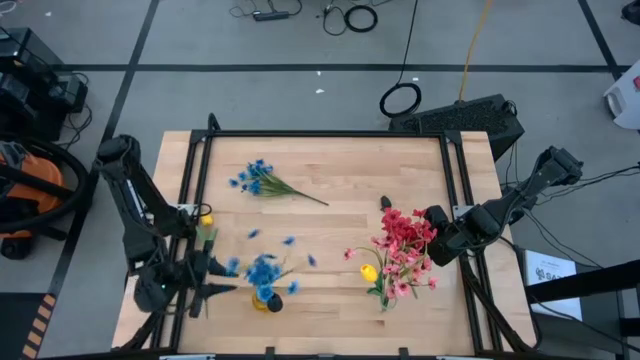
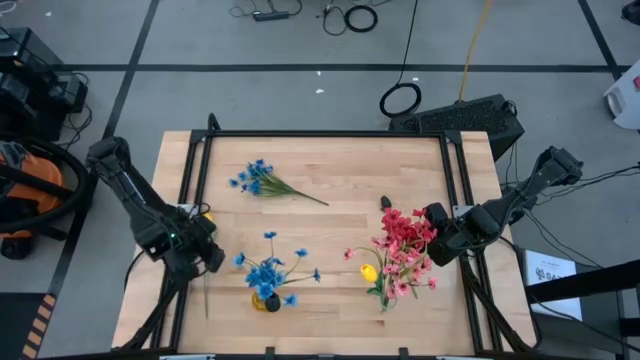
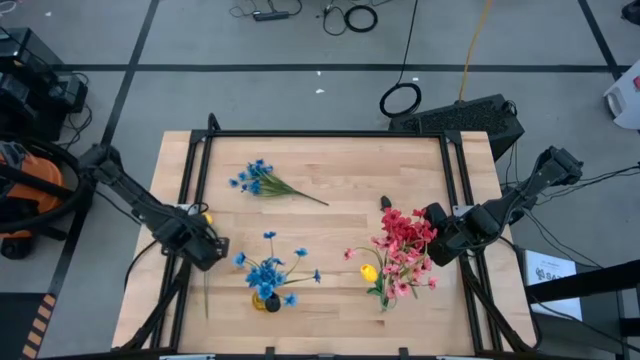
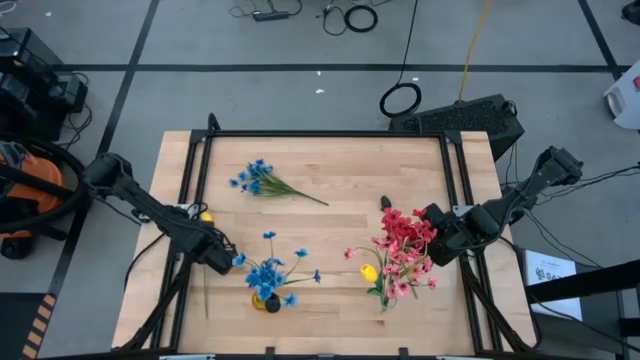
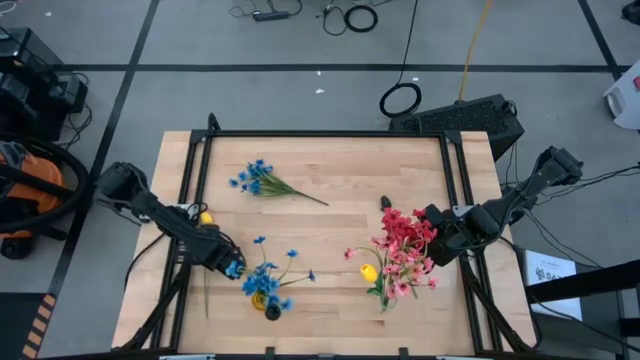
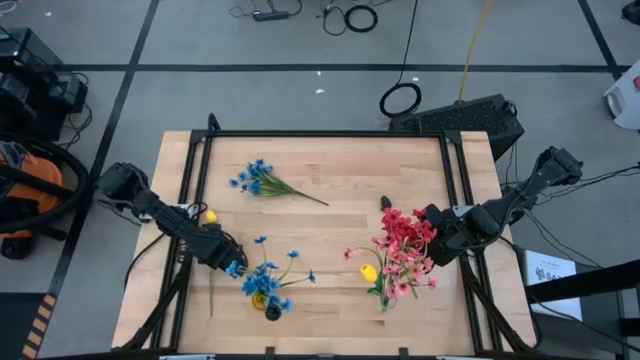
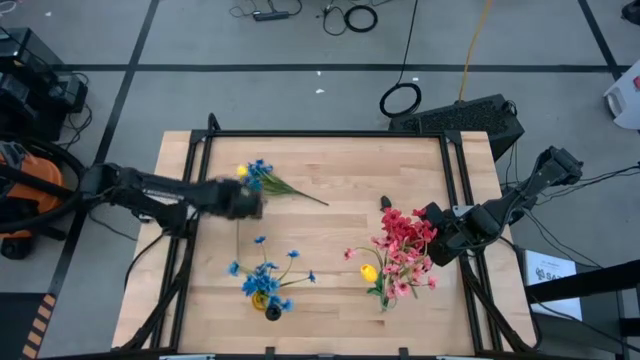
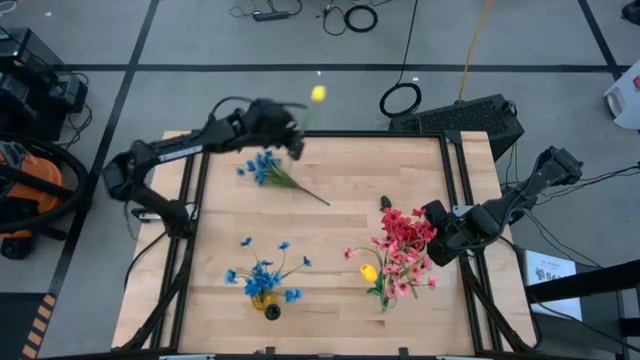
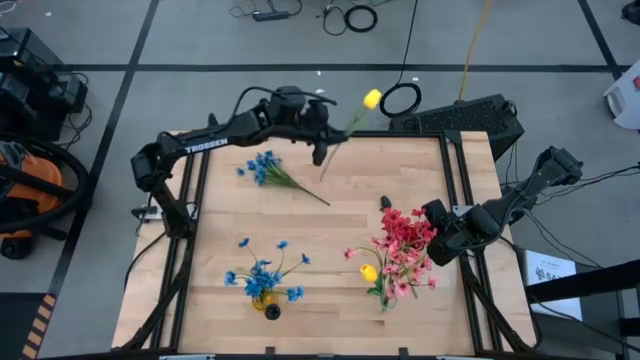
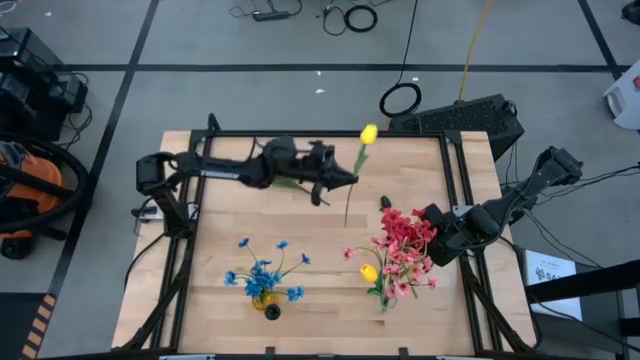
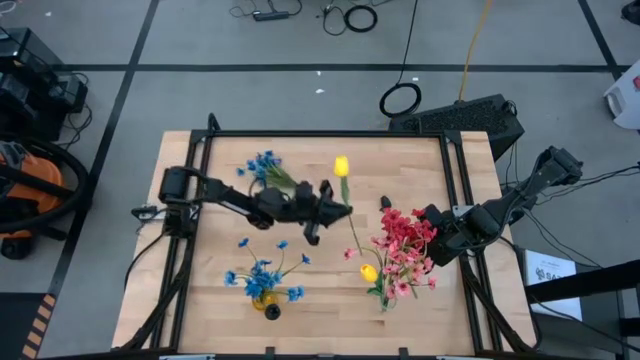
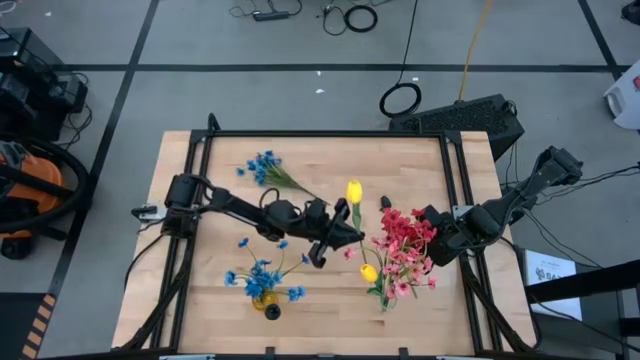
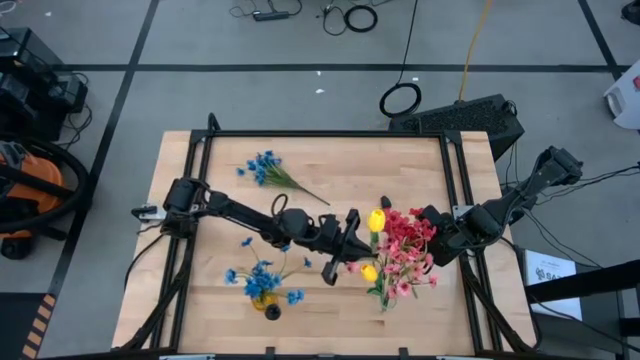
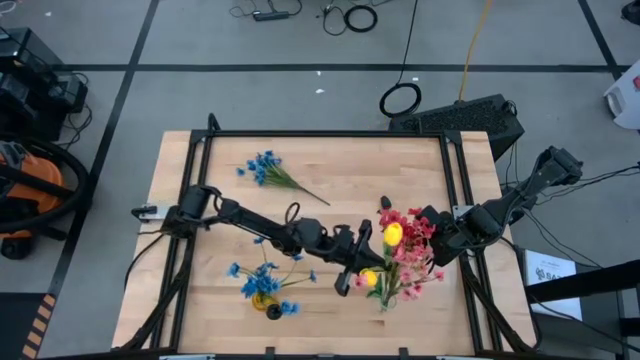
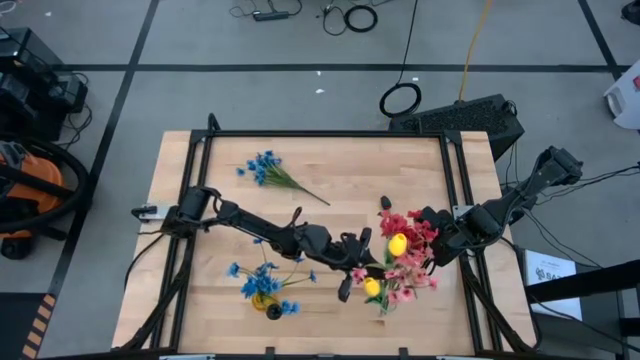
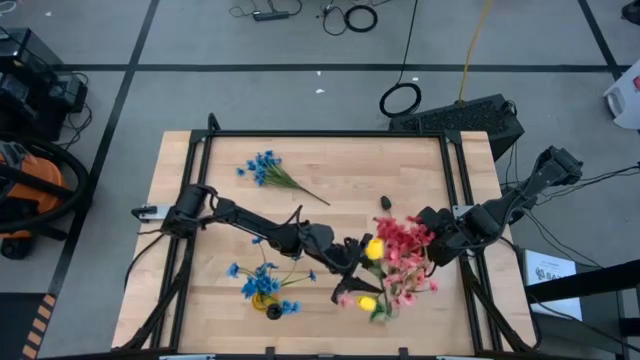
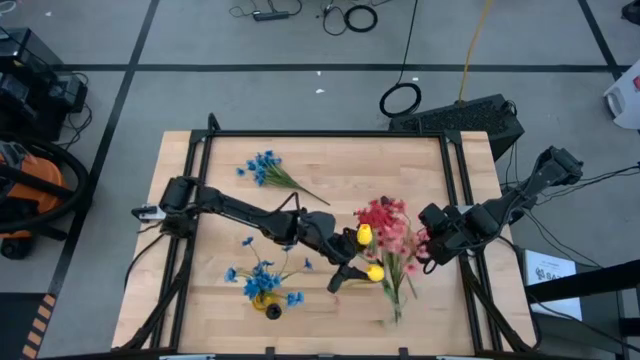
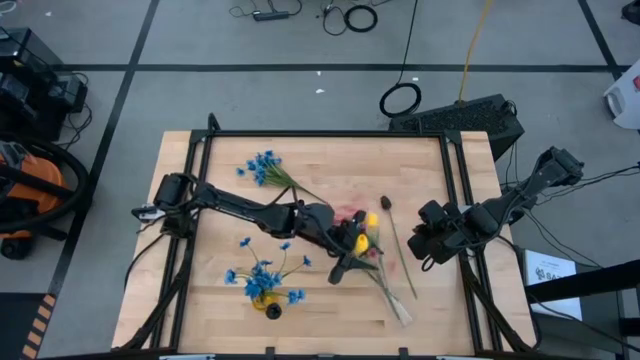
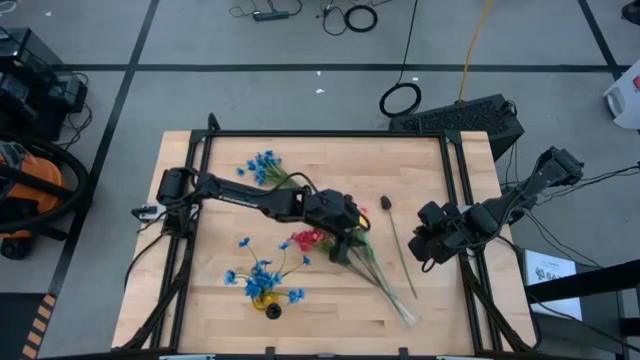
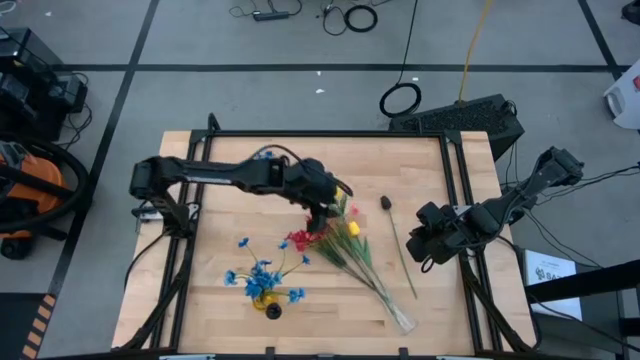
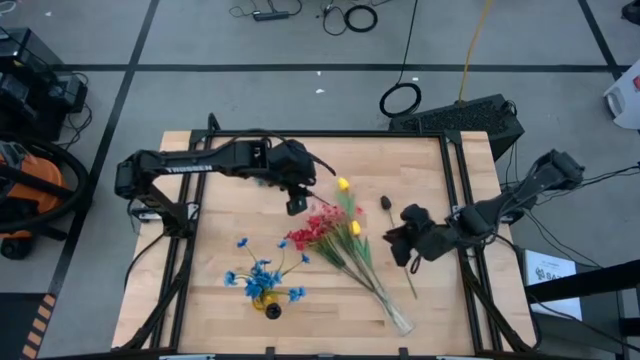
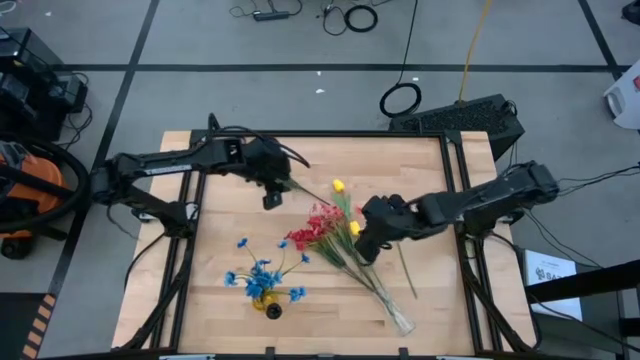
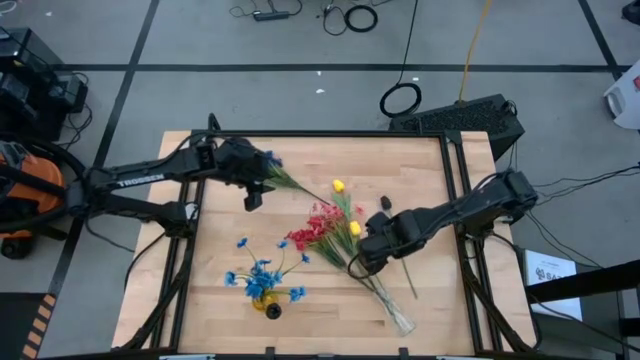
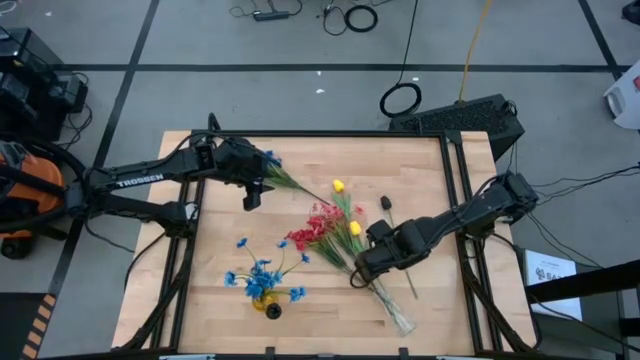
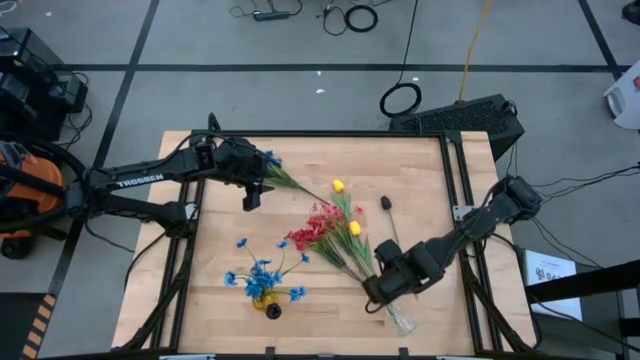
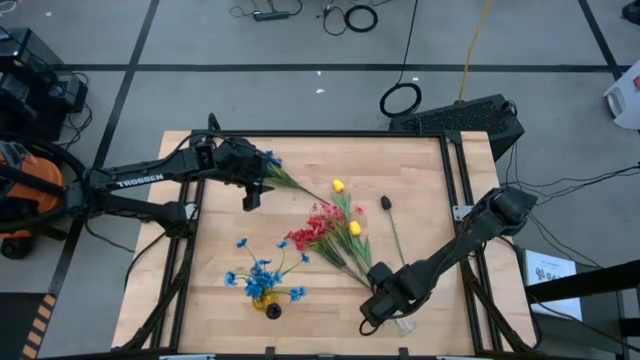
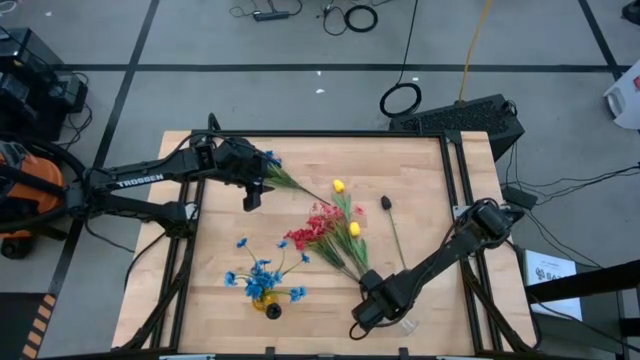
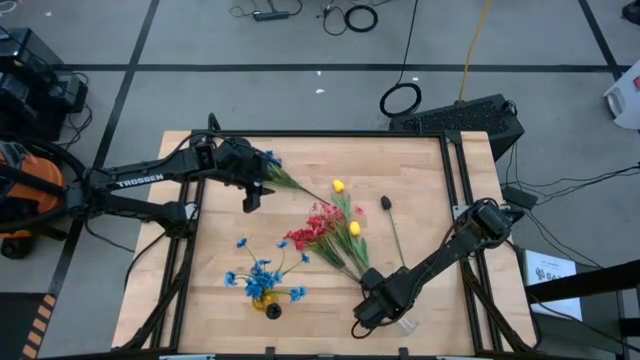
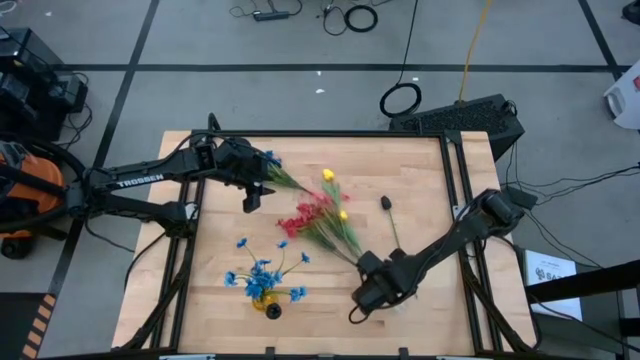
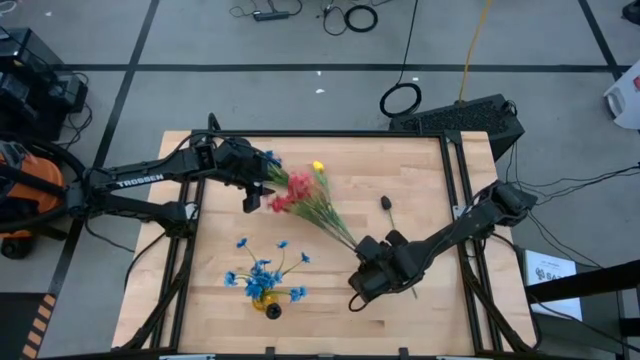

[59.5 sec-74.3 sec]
Task: Sort flowers into vase by color
Put the yellow tulip into the transparent vase

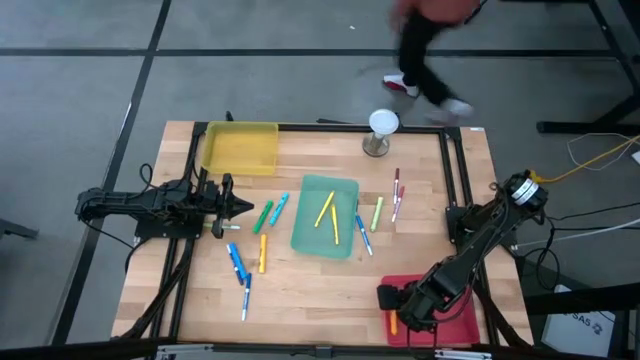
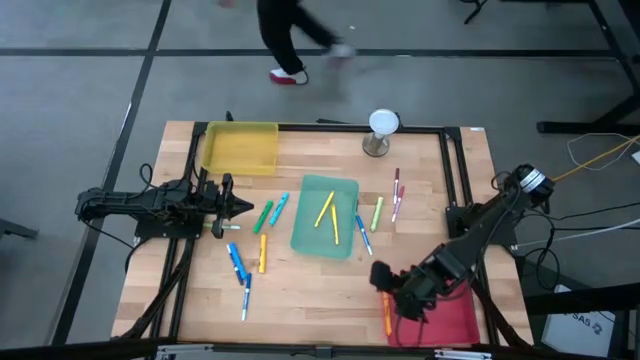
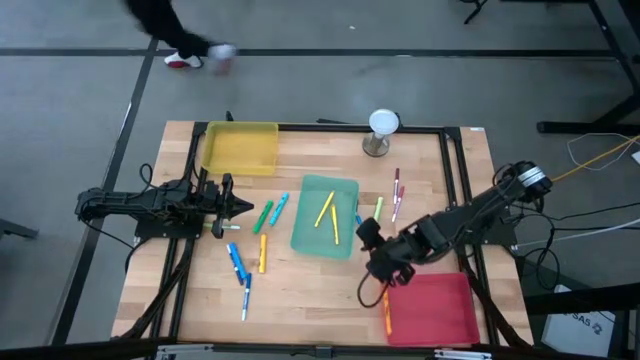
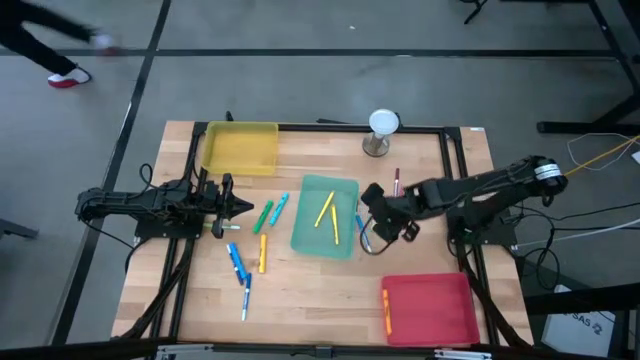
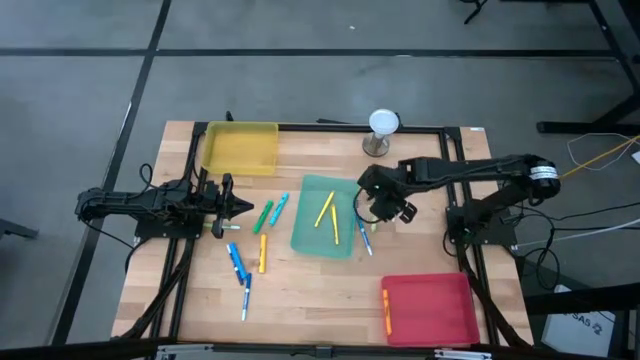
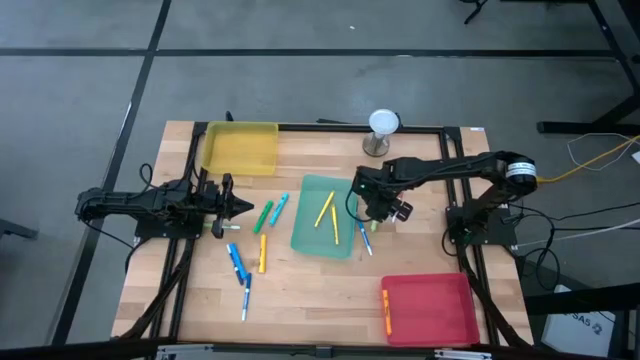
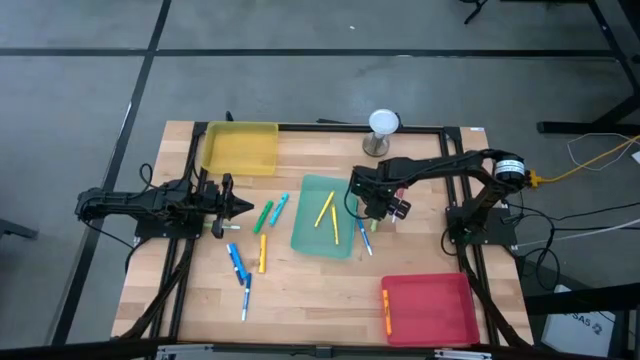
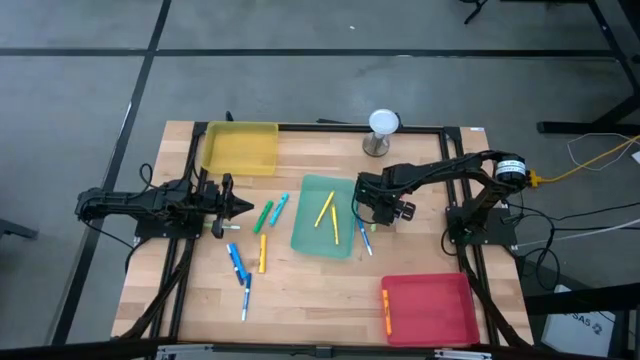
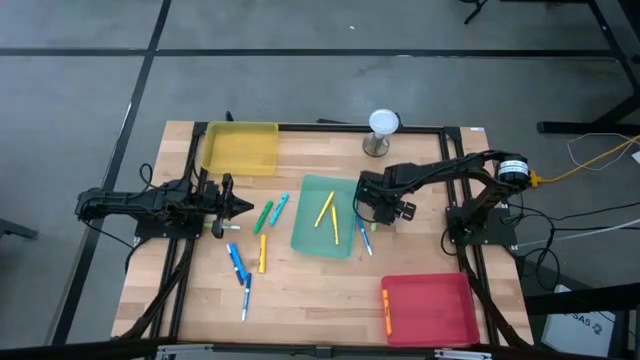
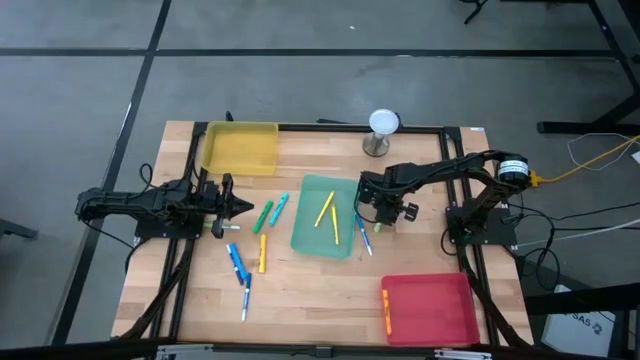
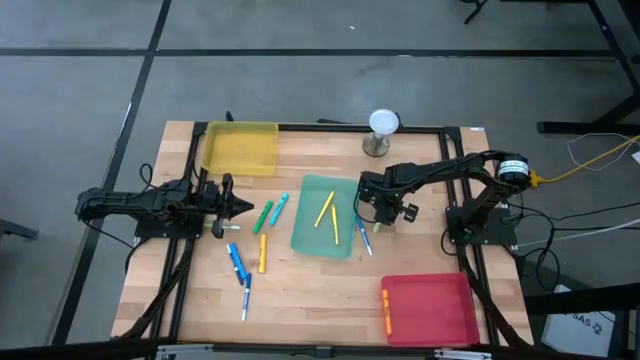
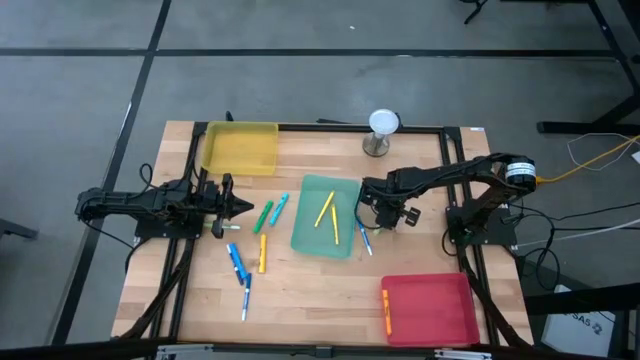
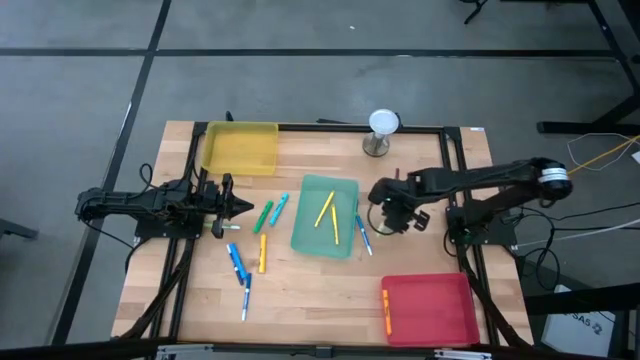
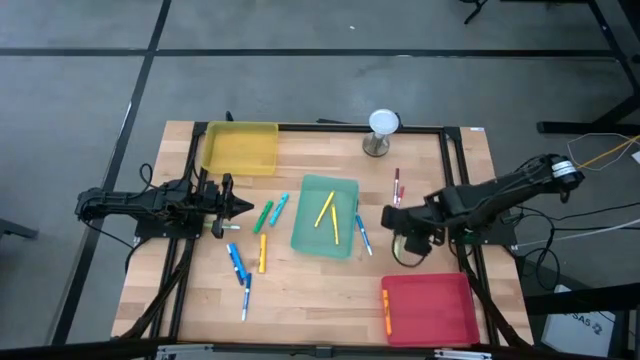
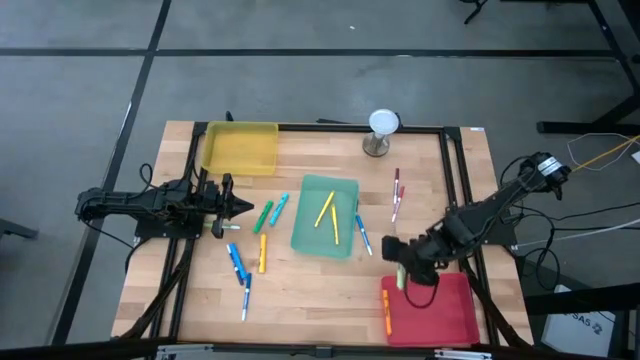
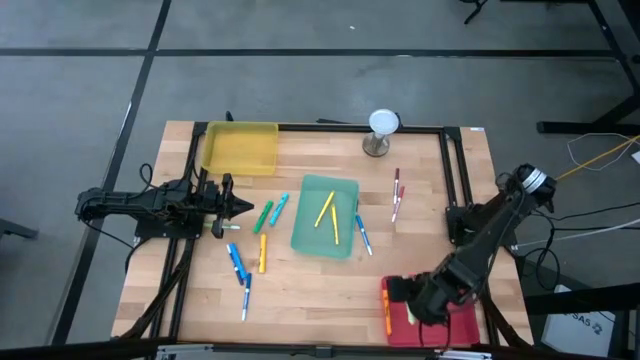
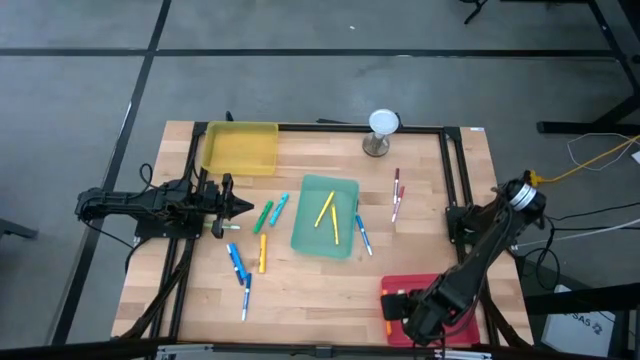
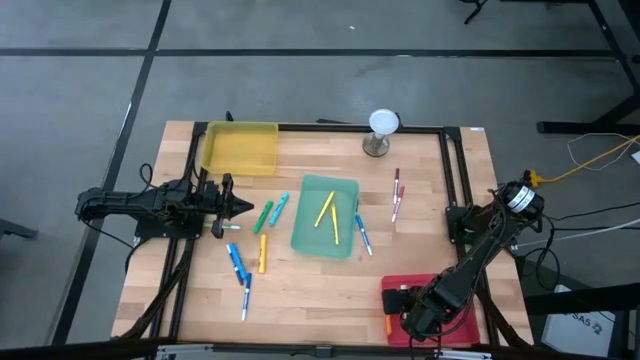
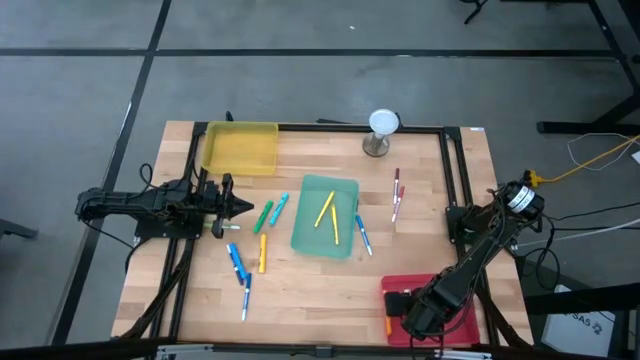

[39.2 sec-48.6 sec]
Task: Pick & Place Markers
Put the light green highlighter pen into the pink bin
